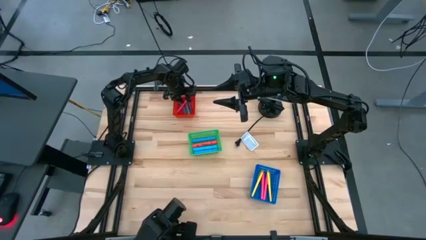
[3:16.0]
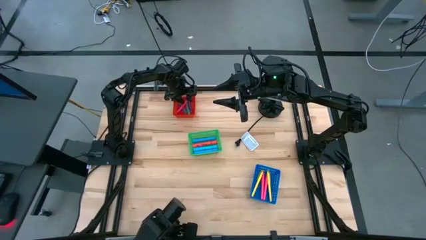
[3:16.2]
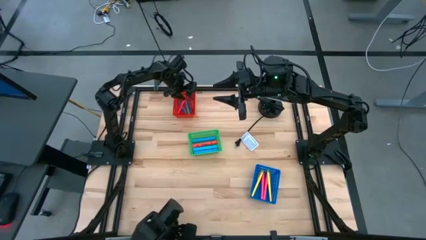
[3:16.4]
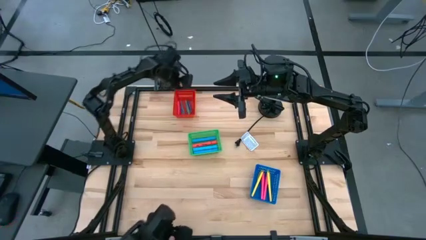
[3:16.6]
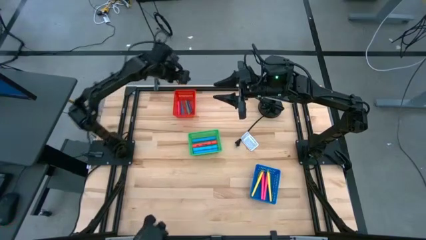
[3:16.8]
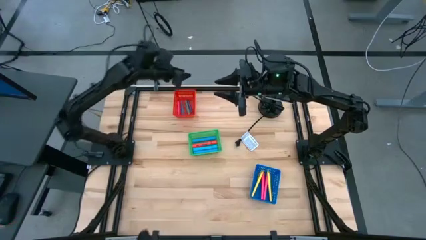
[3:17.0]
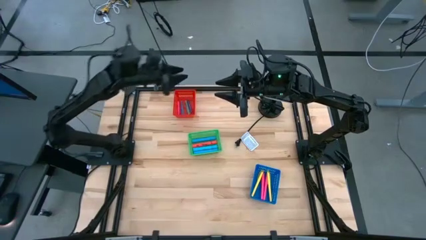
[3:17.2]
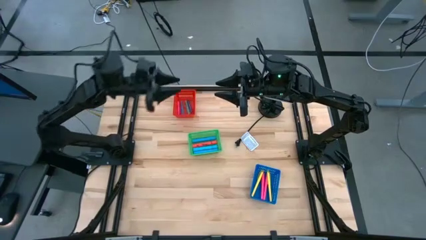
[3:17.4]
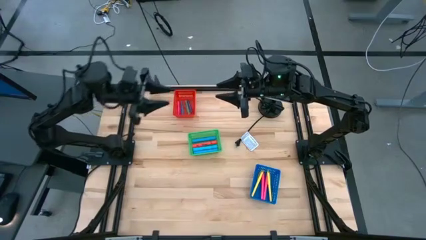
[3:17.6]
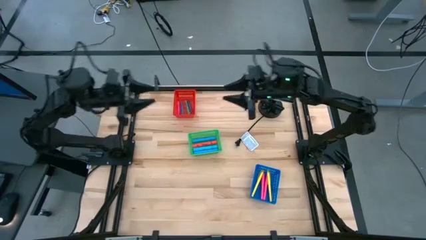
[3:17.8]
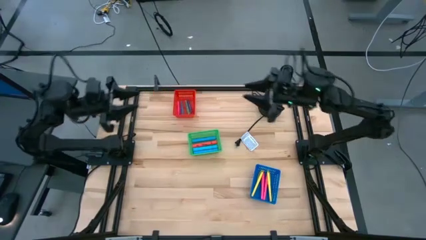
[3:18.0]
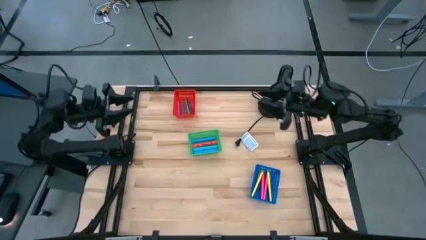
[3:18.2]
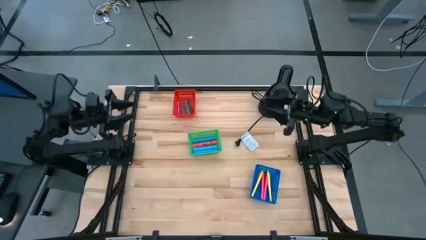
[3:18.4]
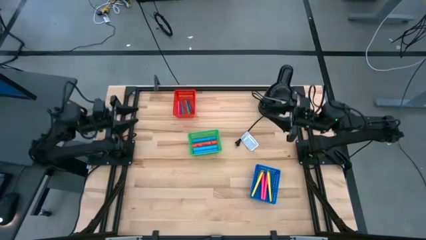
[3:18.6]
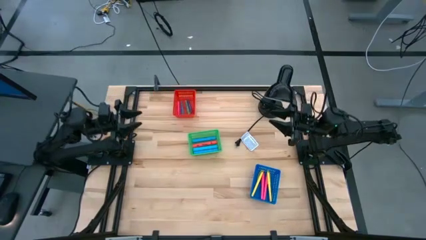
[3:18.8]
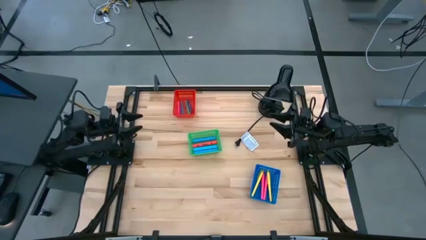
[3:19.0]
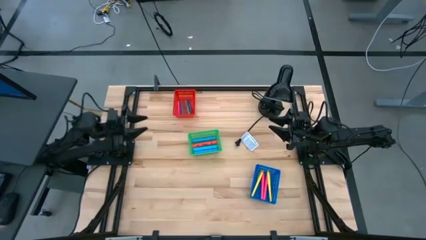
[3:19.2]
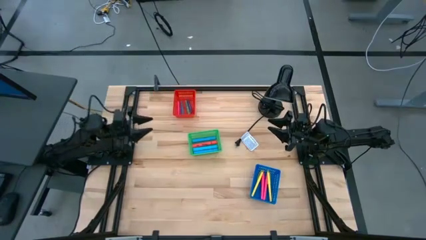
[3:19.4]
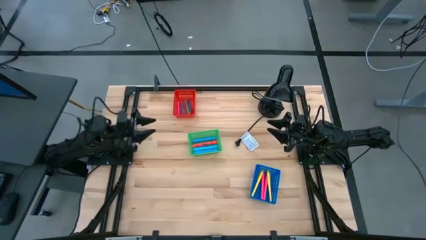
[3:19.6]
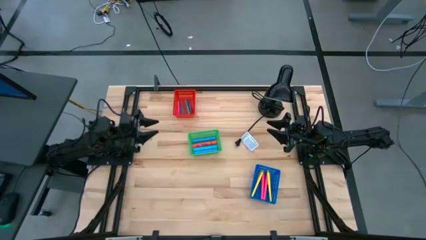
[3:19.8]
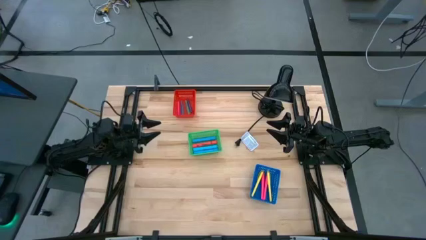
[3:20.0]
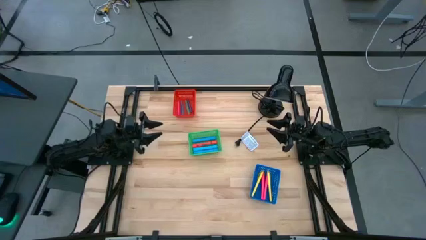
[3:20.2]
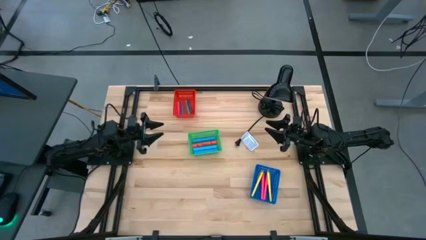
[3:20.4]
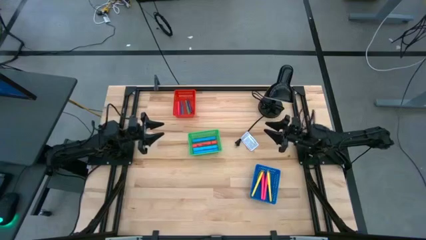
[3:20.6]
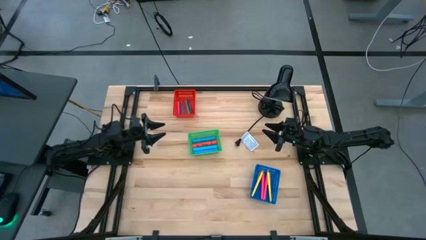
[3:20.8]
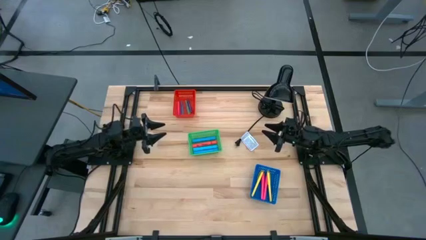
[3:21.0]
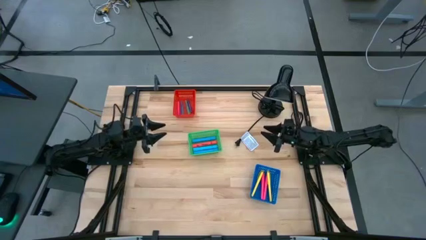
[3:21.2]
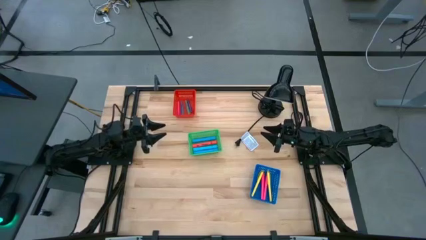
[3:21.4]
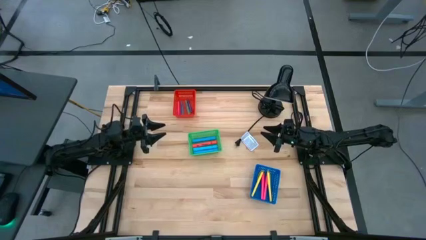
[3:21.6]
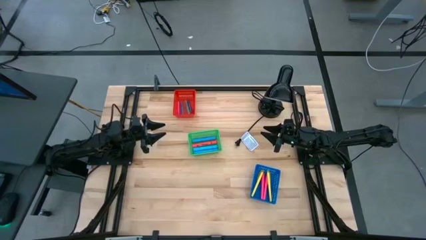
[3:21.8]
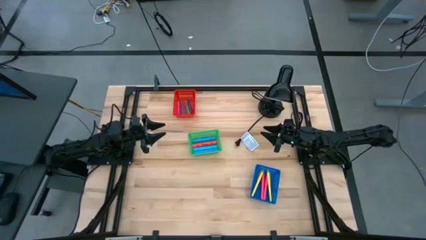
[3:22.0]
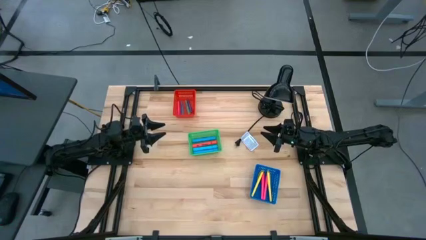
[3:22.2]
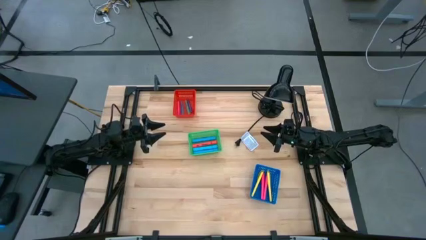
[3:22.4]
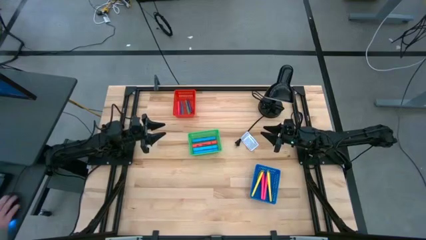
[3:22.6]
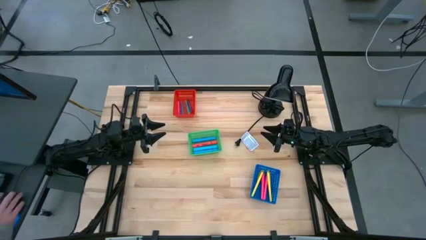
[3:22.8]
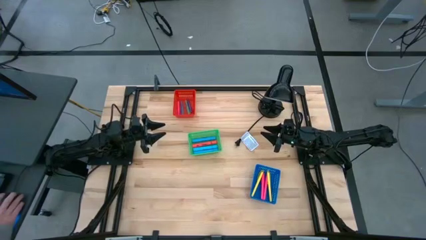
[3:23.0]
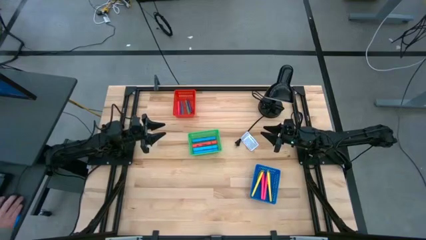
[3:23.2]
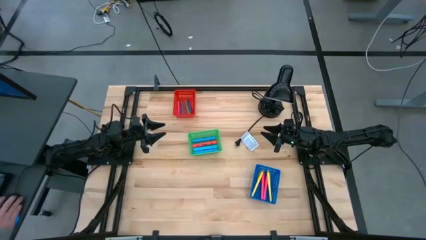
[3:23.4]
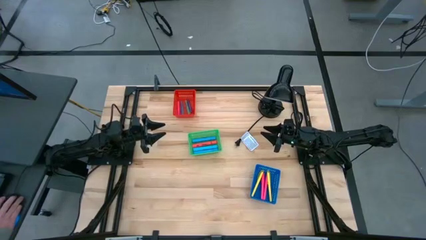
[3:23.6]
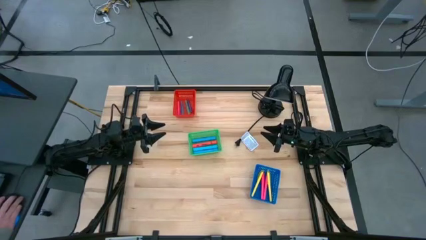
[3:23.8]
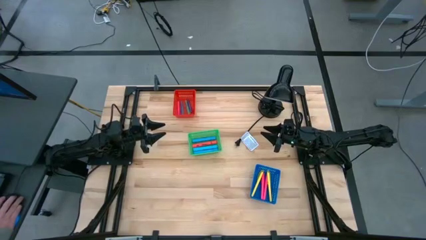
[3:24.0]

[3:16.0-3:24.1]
Task: Pick & Place Markers
Return to Home Position

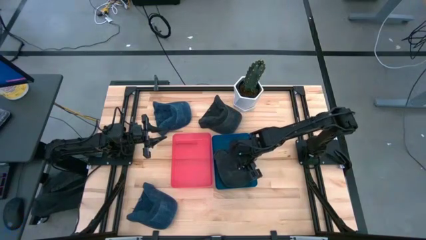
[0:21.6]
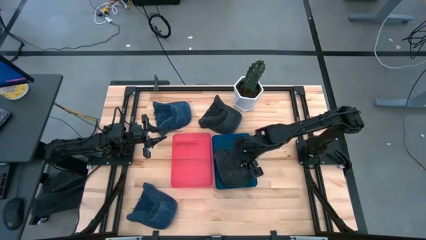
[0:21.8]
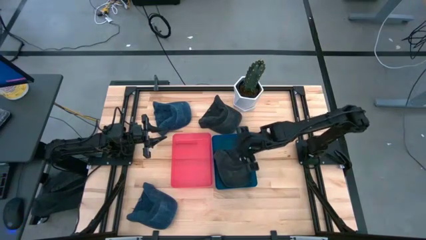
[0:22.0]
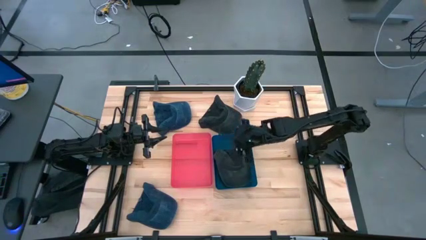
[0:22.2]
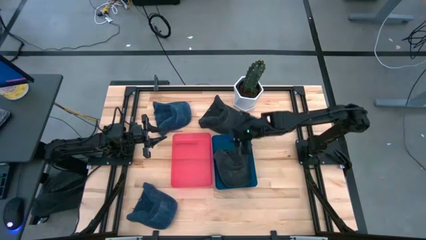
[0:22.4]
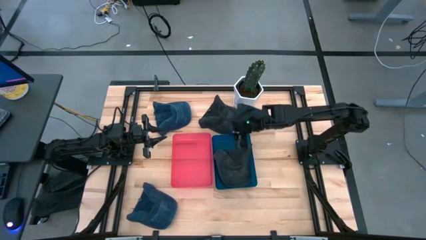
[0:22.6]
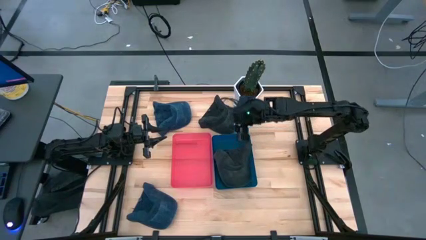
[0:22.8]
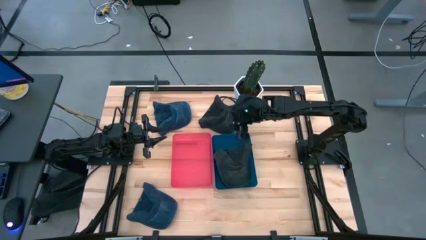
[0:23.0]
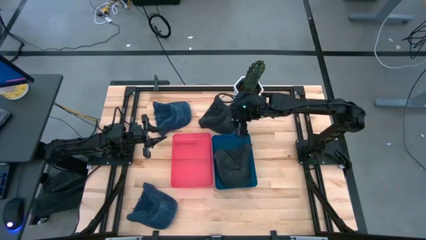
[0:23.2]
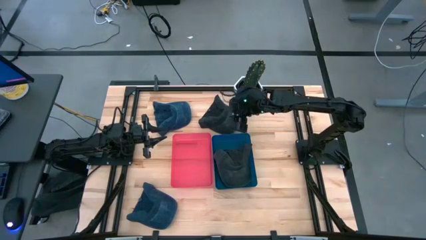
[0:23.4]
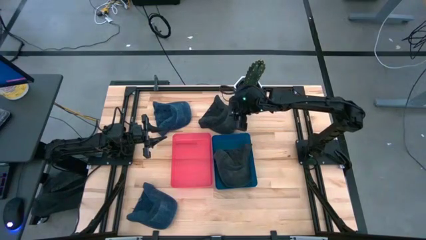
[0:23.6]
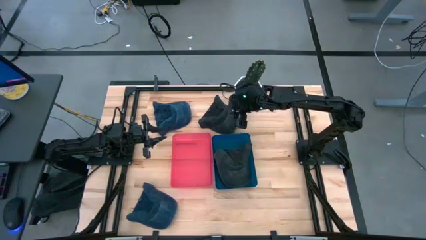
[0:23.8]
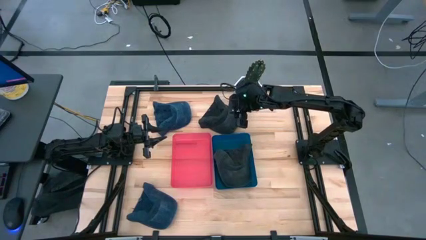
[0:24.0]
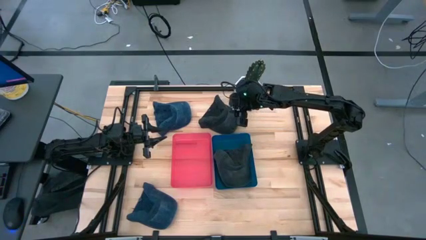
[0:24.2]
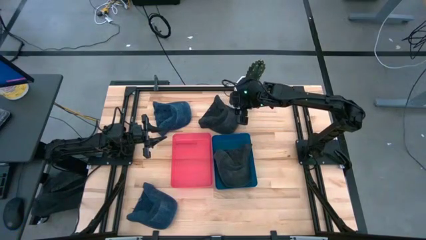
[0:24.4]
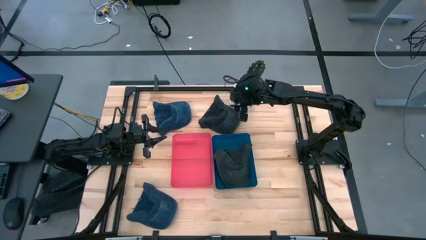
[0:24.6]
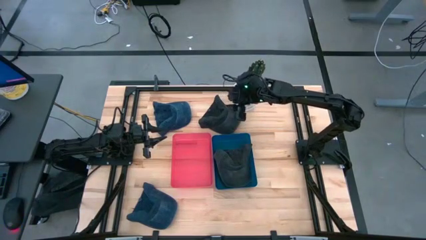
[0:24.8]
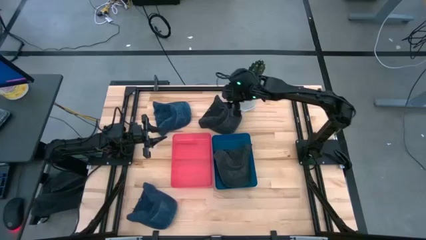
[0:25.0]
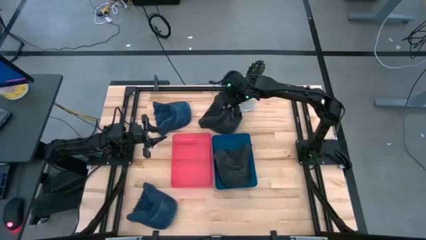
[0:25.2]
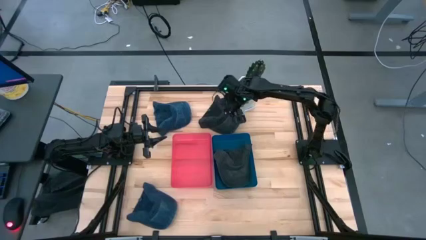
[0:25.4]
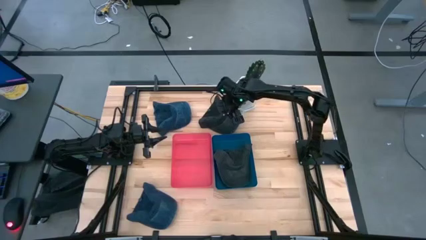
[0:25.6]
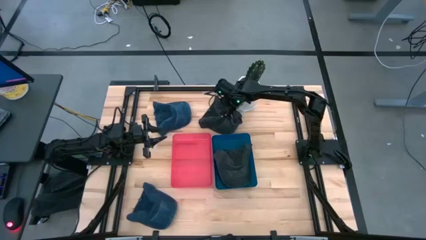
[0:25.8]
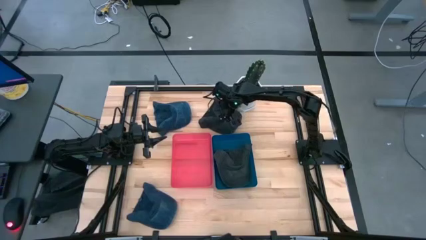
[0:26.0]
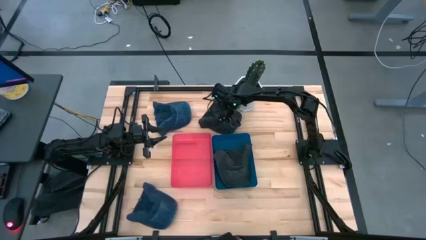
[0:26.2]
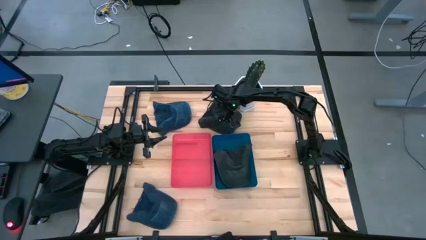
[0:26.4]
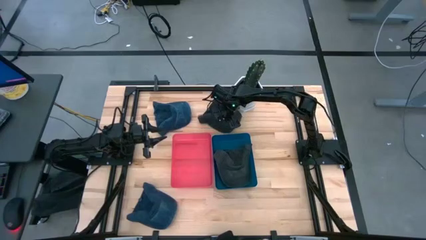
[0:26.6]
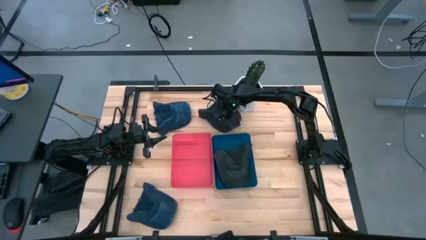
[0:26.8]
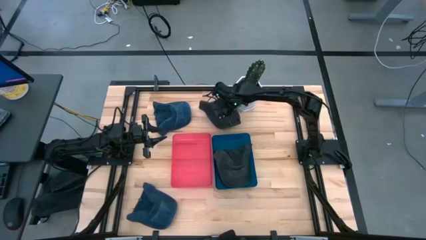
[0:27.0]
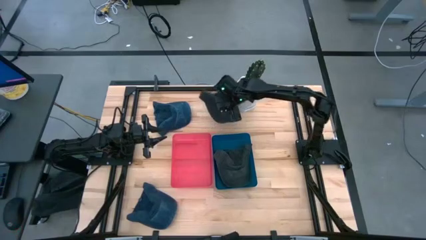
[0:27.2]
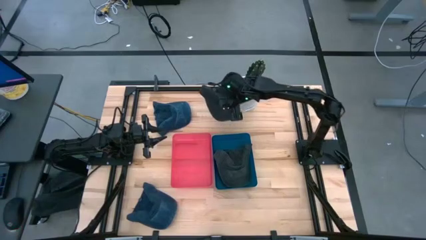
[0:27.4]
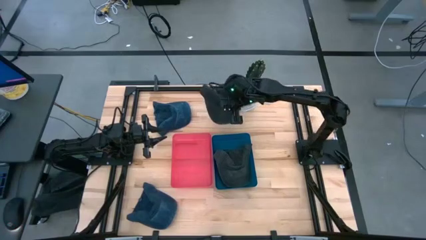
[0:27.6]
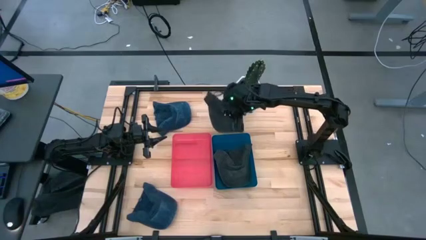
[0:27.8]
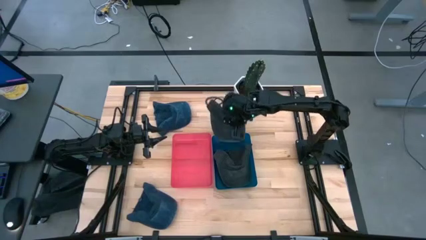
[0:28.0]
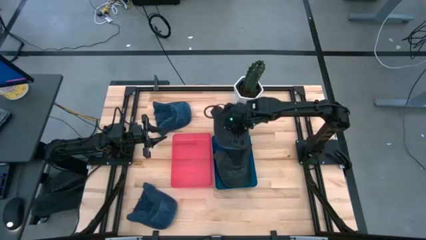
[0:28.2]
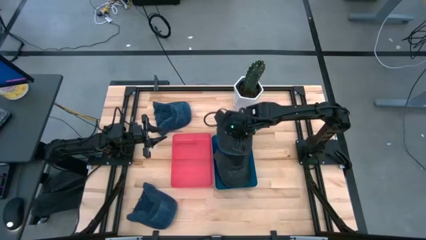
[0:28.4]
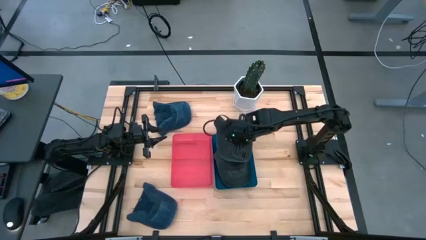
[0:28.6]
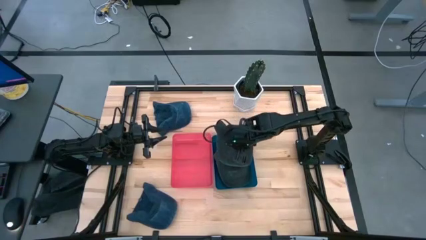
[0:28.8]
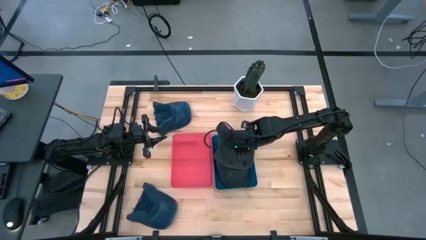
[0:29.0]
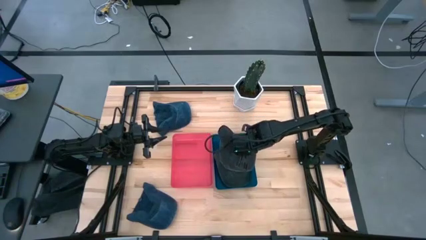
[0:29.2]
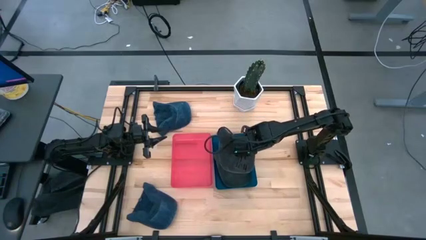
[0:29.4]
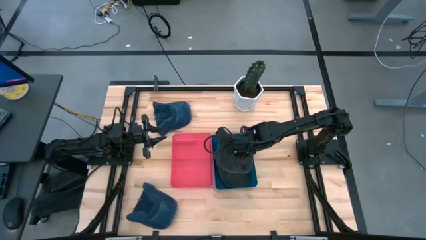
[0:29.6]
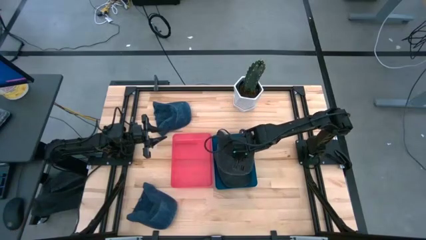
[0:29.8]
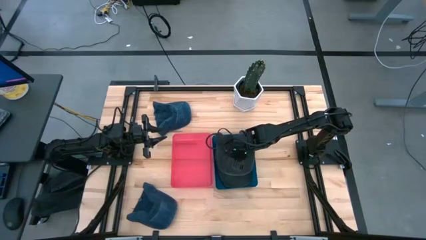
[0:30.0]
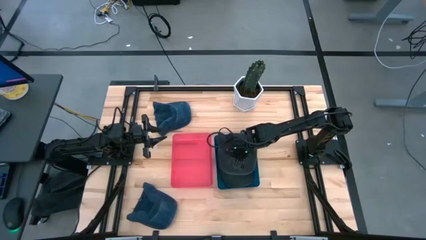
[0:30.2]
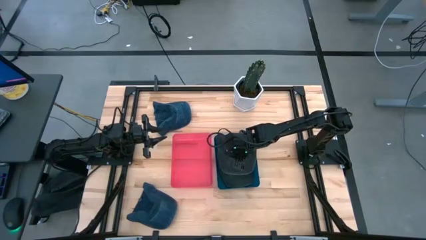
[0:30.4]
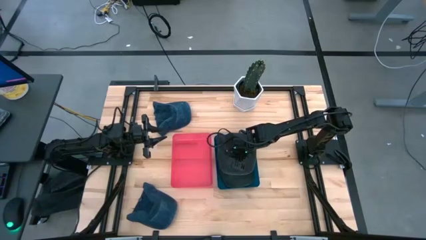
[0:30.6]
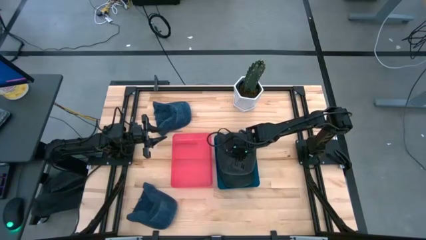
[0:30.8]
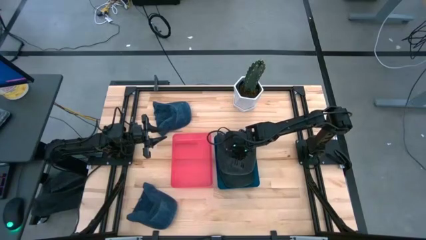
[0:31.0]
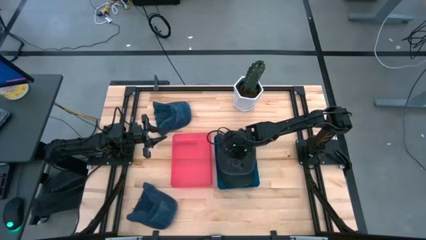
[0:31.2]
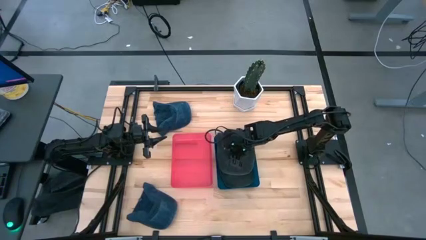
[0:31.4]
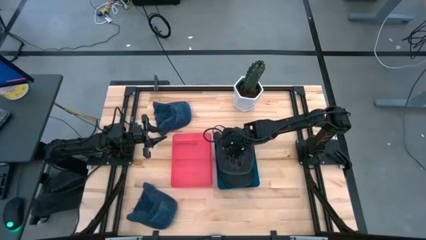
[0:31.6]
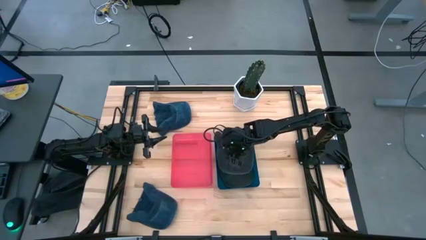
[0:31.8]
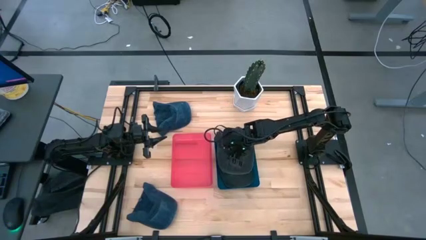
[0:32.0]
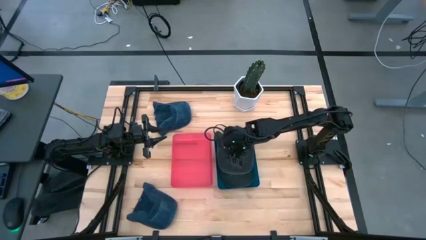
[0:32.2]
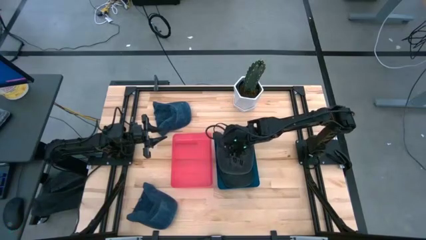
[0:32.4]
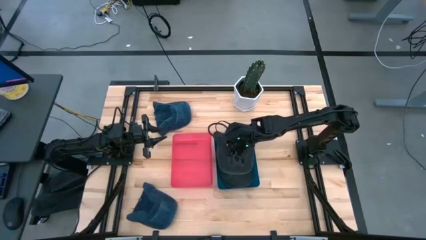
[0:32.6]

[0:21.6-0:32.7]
Task: Pick & Place hat
Put the black cap into the blue bin
